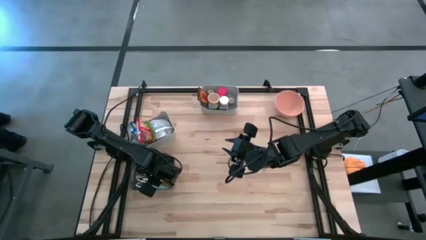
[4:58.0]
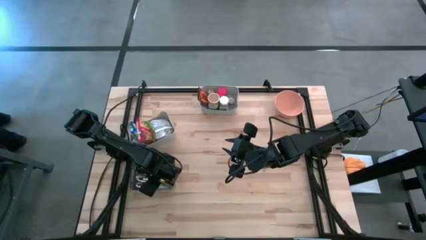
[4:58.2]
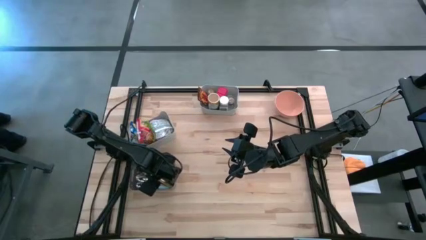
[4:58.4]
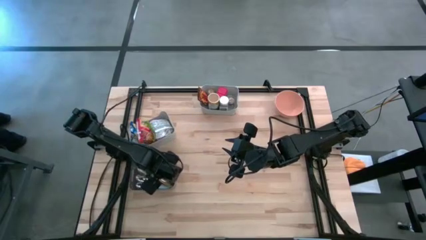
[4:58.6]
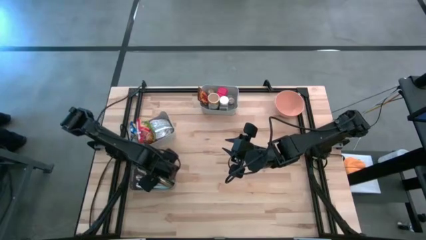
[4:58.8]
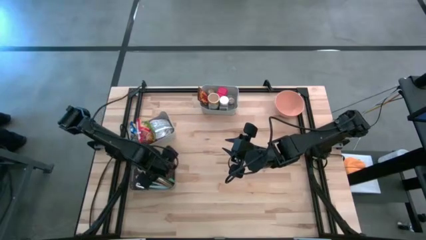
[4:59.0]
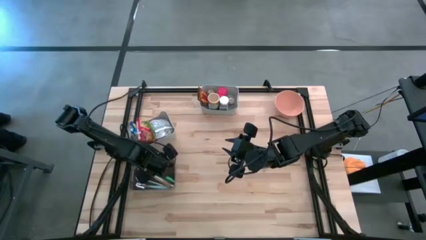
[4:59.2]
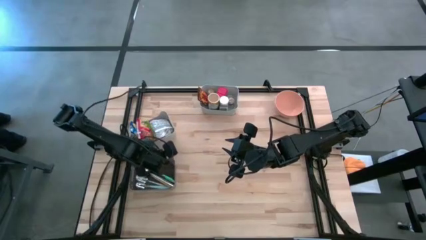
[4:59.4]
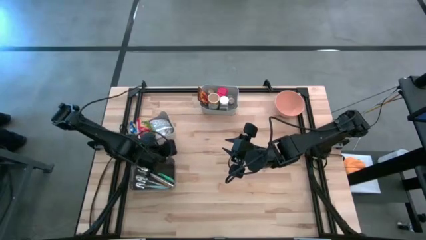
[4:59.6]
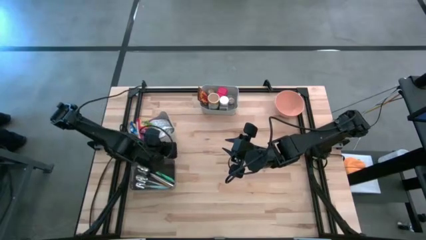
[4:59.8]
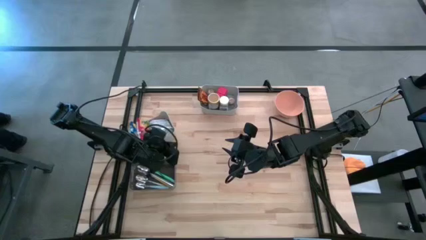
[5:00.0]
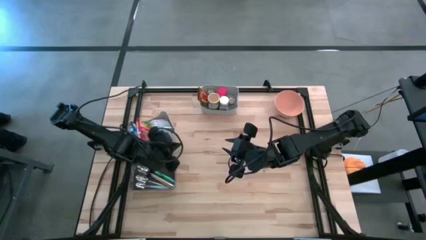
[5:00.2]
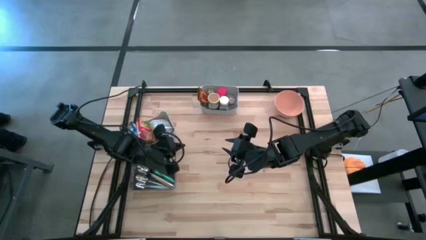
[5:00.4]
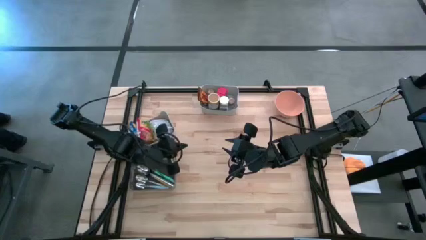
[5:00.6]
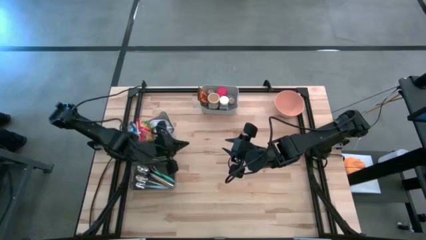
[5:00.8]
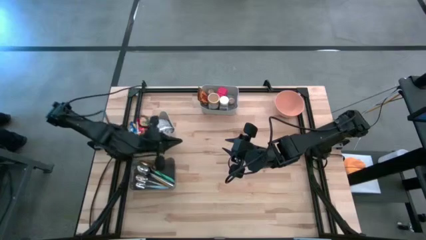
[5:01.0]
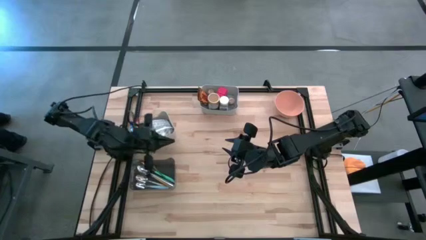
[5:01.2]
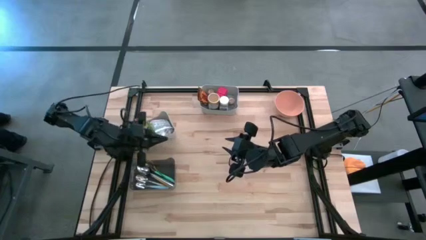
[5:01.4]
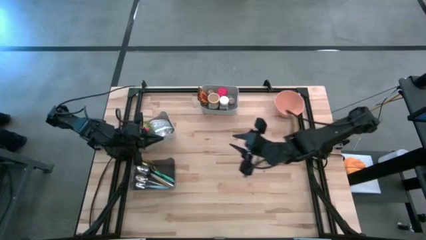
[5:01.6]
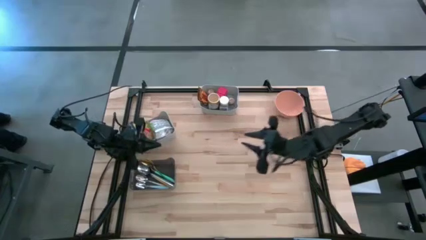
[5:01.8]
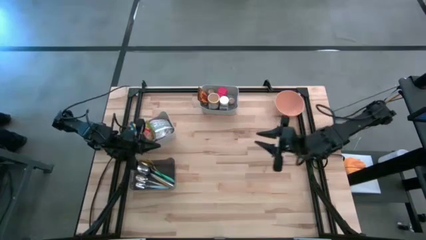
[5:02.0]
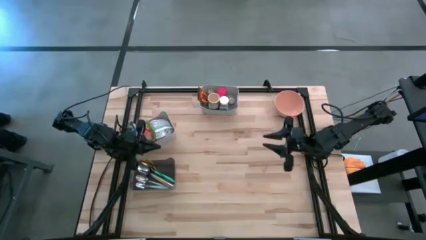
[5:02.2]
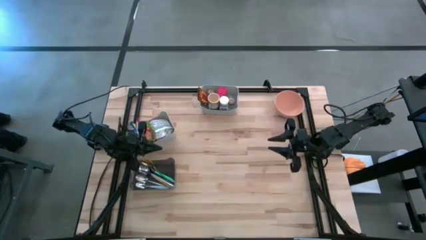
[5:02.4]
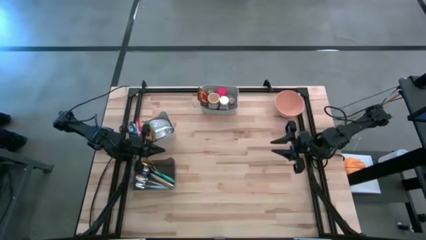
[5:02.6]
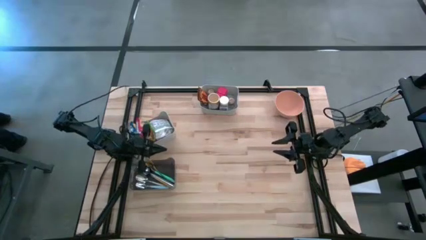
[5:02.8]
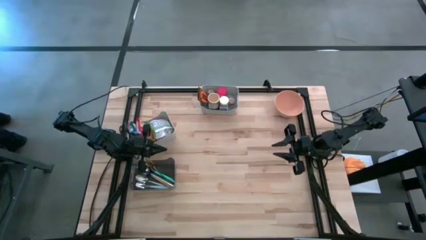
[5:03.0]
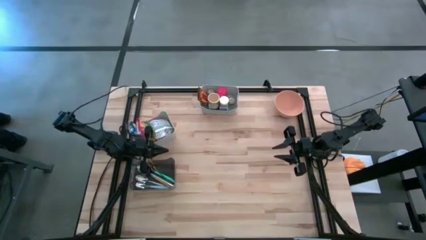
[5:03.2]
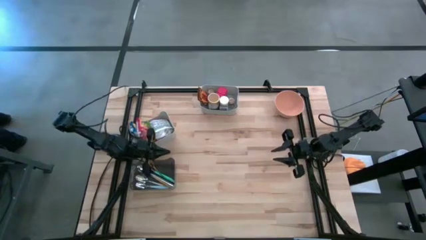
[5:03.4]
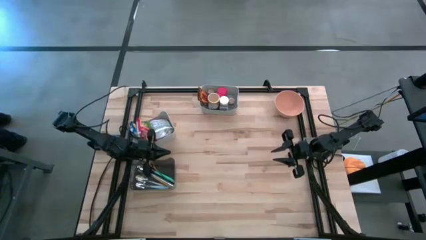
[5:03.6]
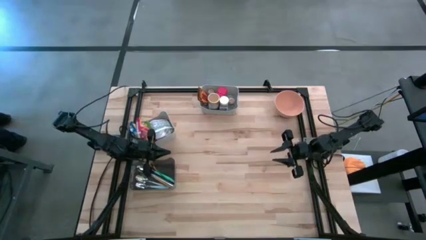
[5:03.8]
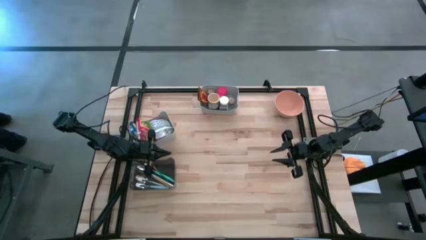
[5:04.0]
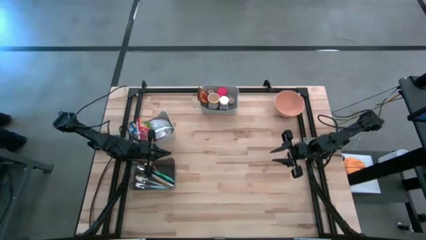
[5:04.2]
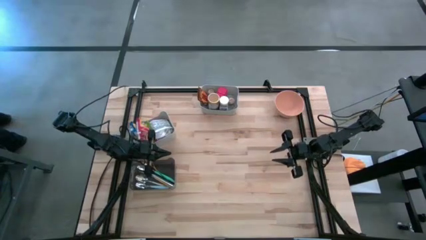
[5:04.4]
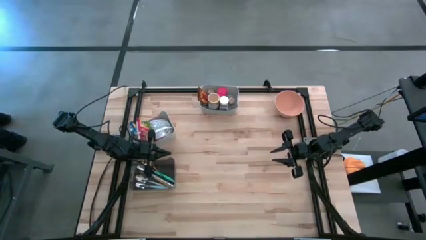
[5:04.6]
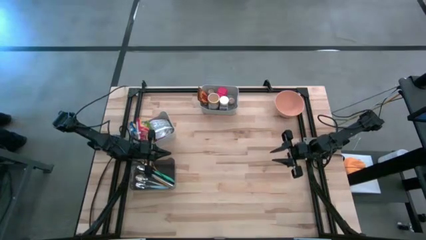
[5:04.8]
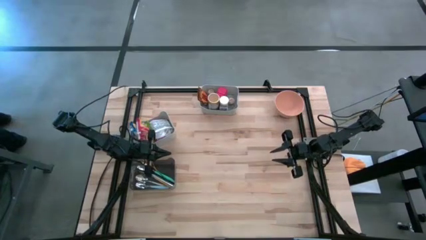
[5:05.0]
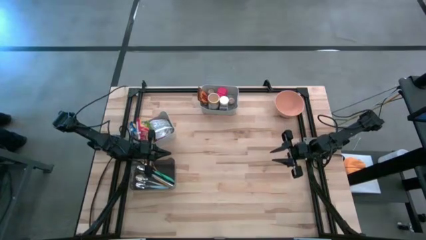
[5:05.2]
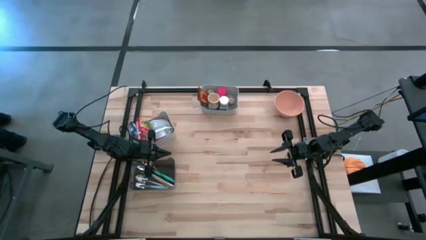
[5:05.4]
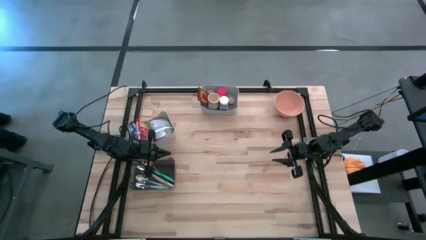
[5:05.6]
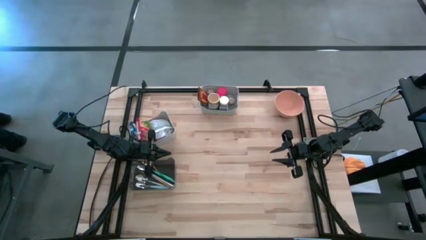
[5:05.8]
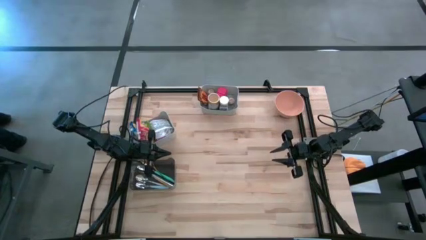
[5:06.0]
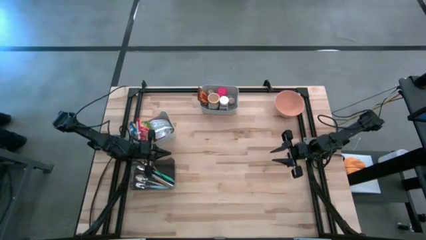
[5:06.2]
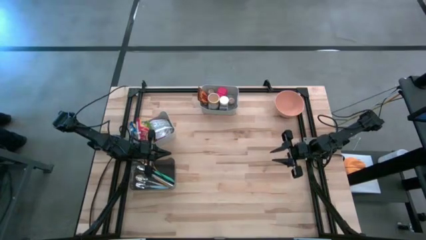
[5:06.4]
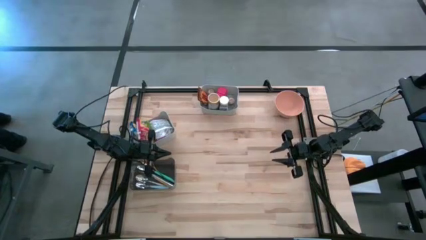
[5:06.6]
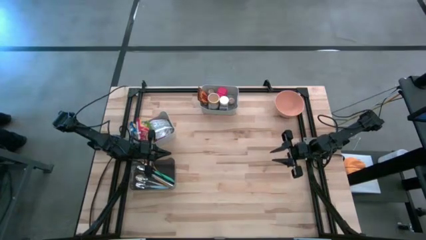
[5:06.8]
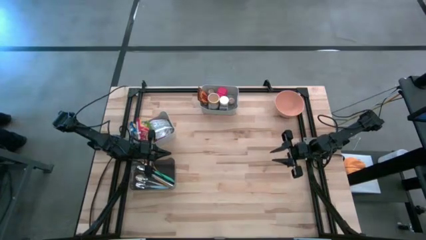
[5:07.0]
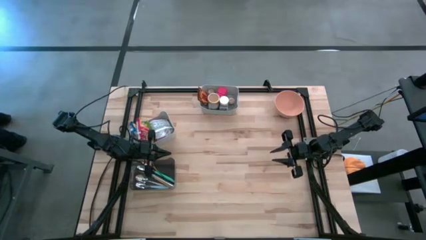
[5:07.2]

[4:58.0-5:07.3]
Return to Home Position
